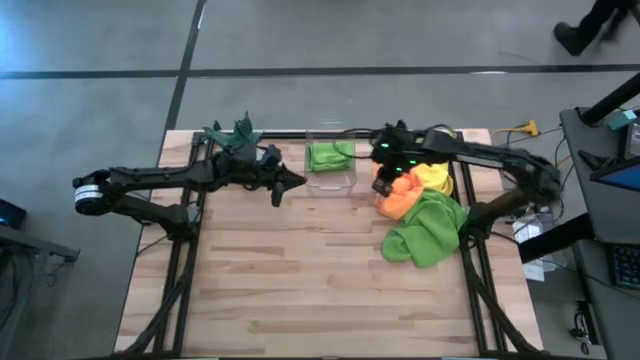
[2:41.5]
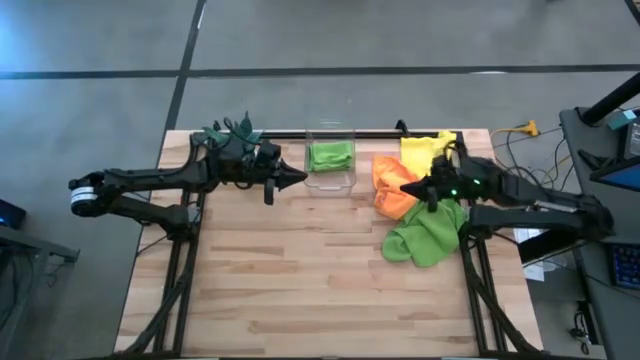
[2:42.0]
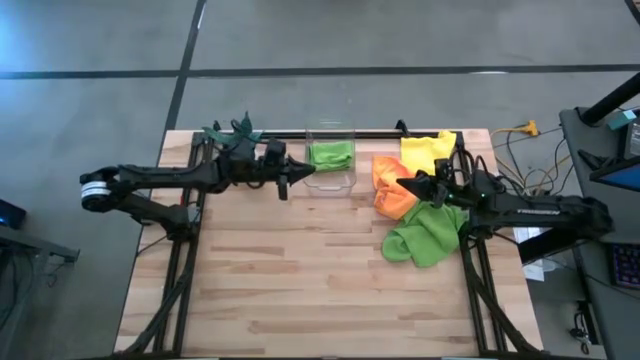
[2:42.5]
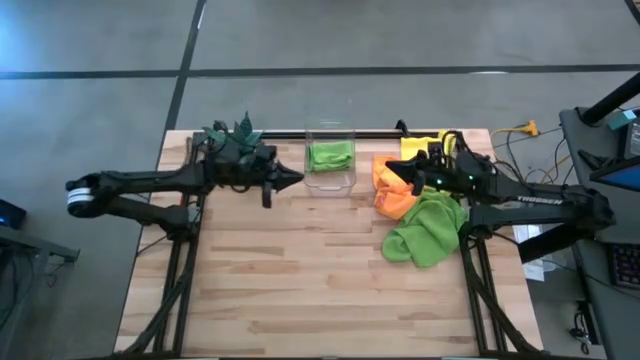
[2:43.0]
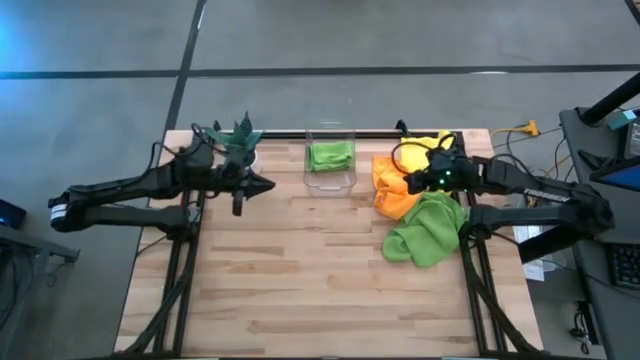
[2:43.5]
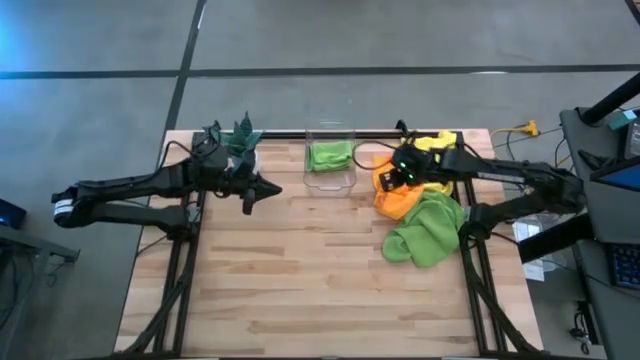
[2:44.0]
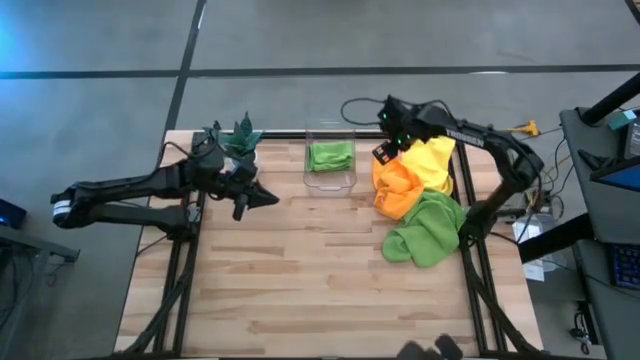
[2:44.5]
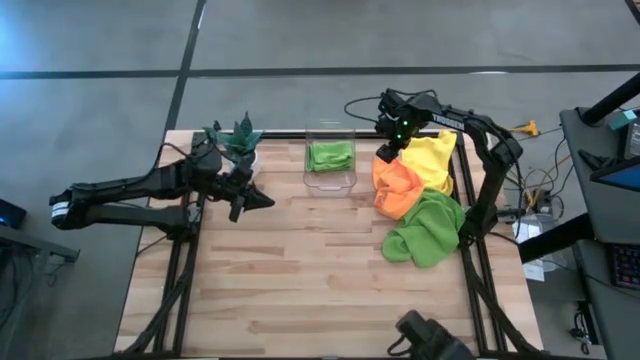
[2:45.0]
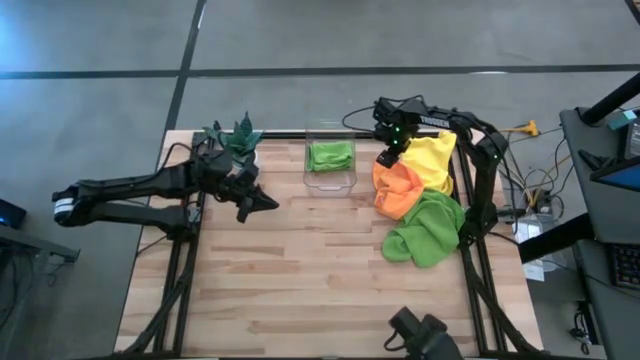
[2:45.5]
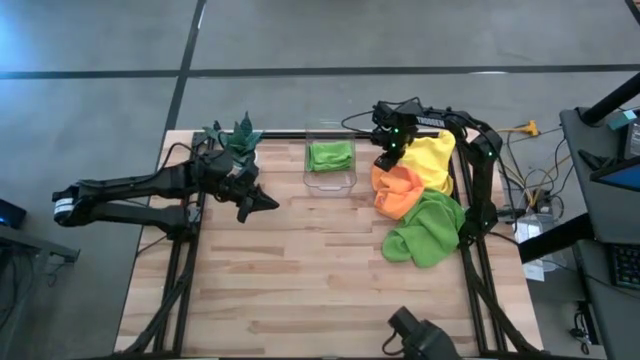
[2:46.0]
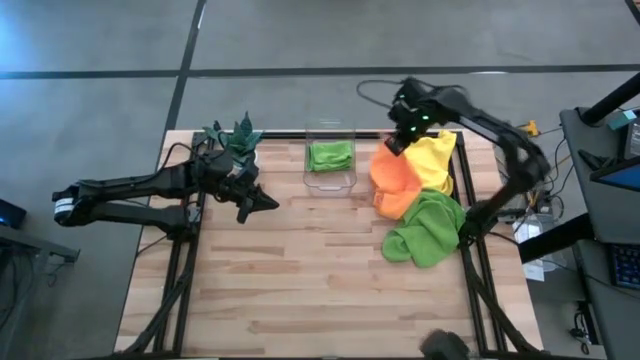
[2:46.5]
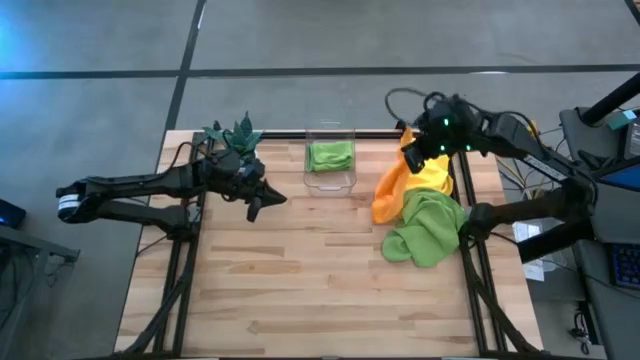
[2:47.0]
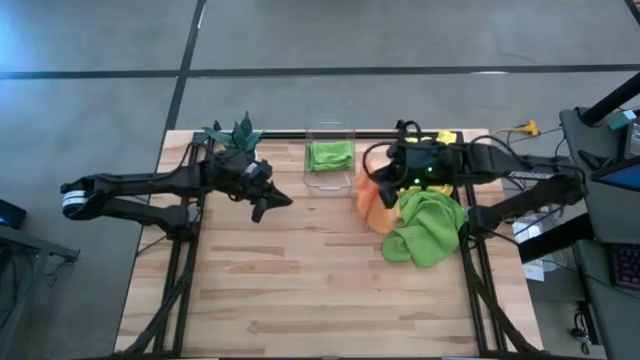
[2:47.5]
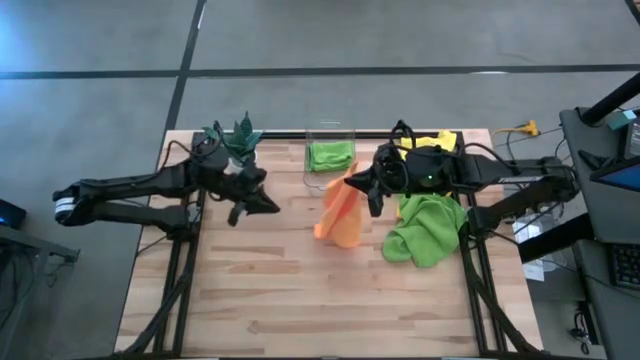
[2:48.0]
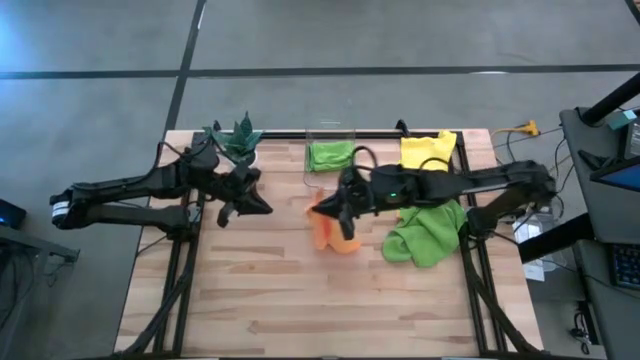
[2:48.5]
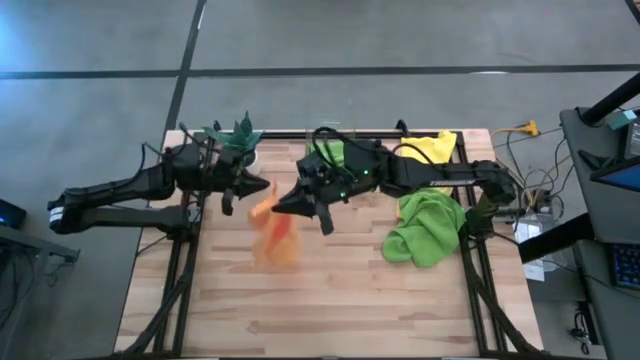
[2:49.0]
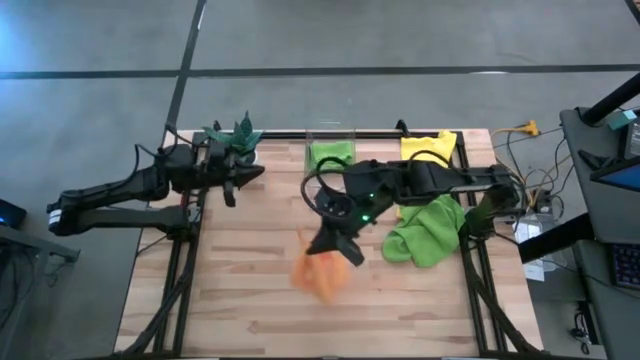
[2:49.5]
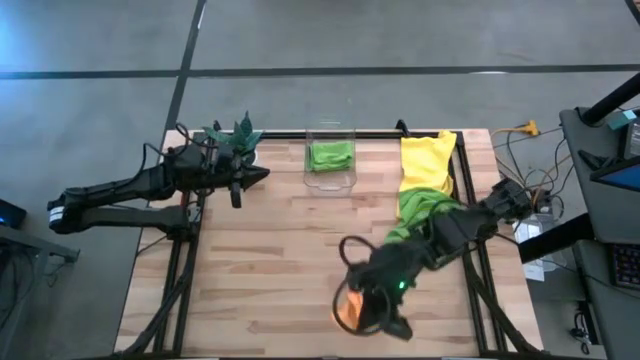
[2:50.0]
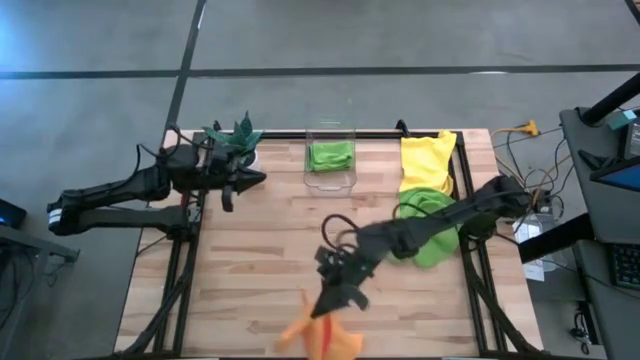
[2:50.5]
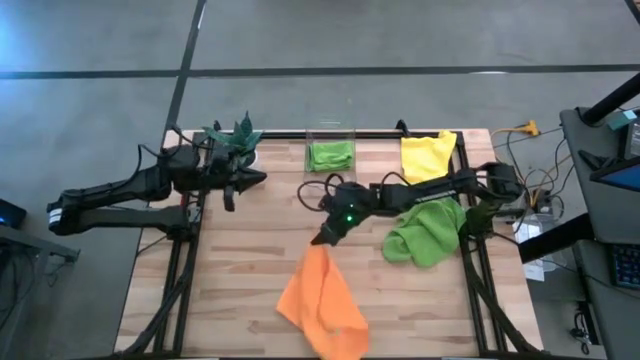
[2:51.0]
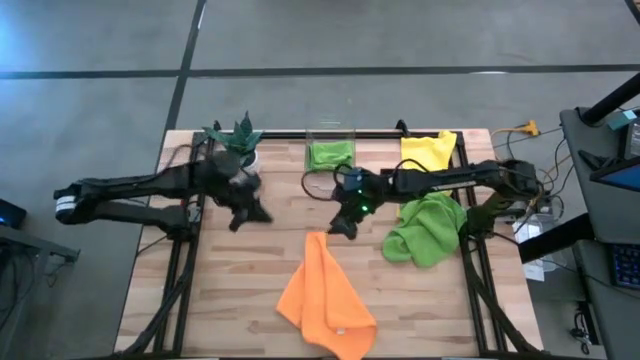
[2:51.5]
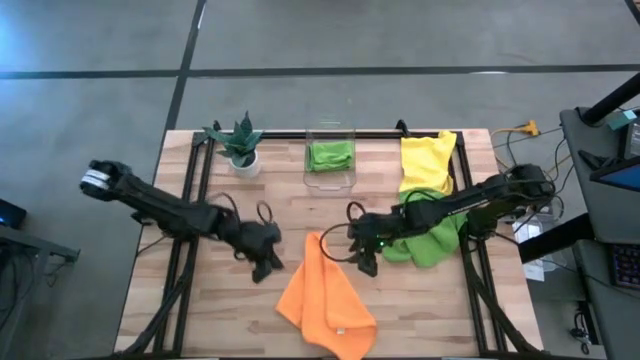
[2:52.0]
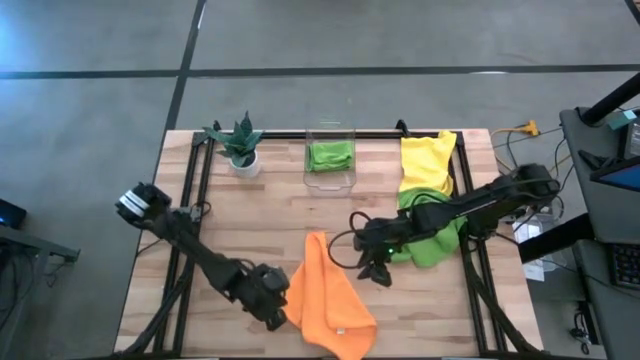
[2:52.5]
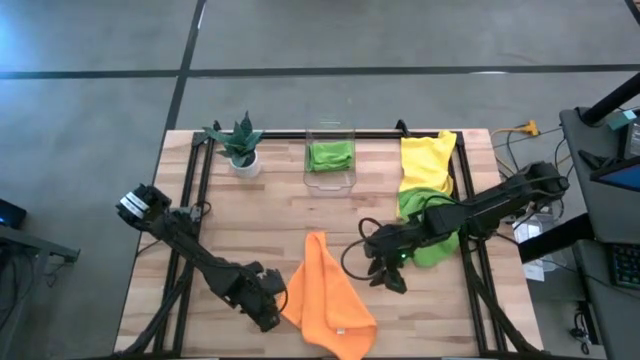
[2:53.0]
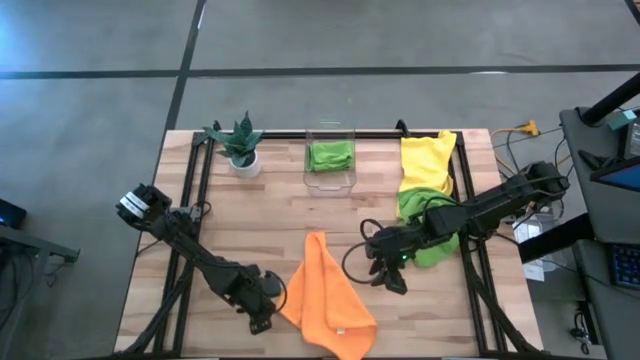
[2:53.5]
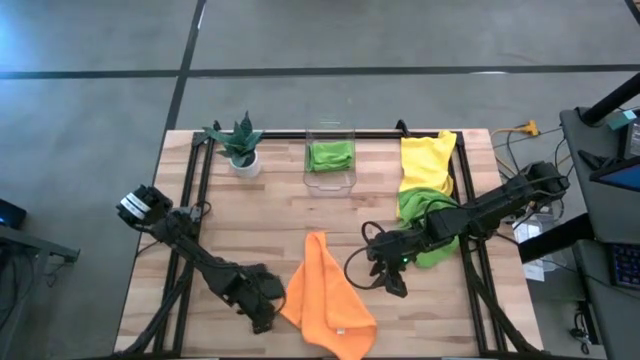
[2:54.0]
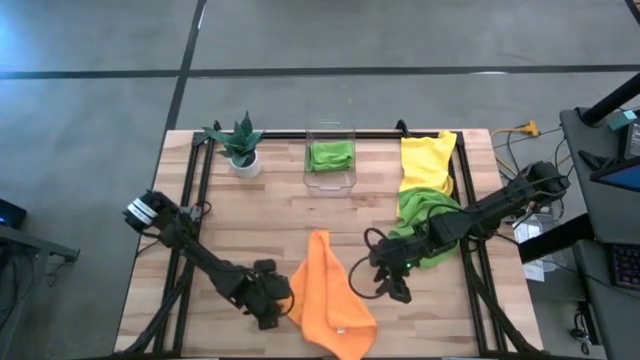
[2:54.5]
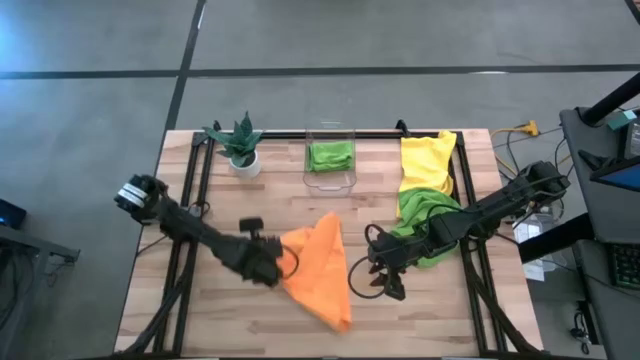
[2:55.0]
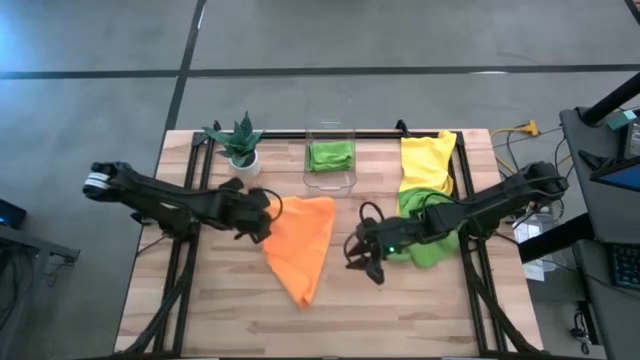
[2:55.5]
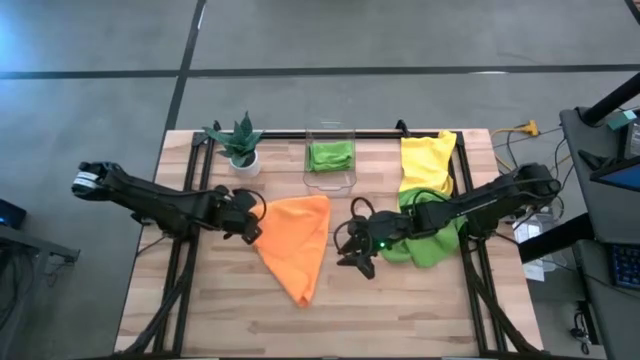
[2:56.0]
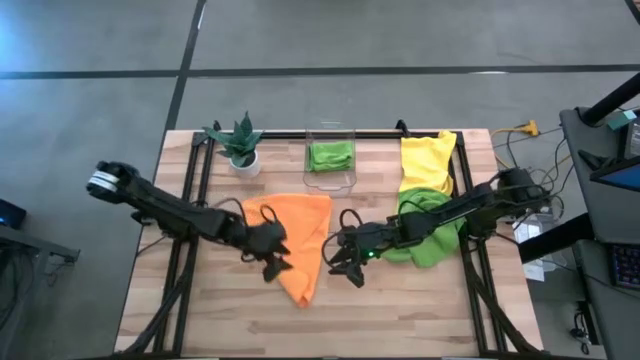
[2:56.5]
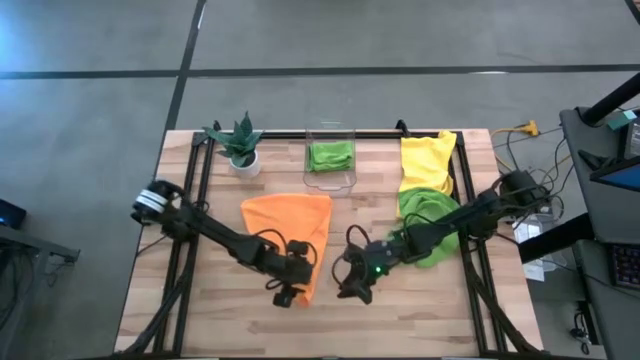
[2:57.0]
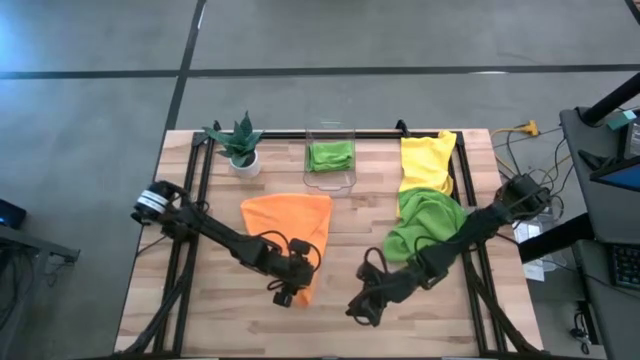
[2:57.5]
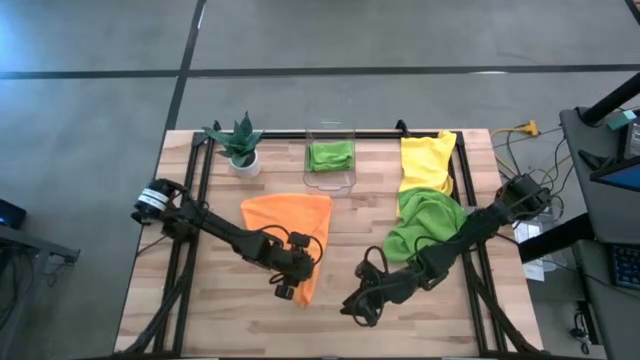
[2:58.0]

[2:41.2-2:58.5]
Task: Fold microfiber towels
Fold the orange towel

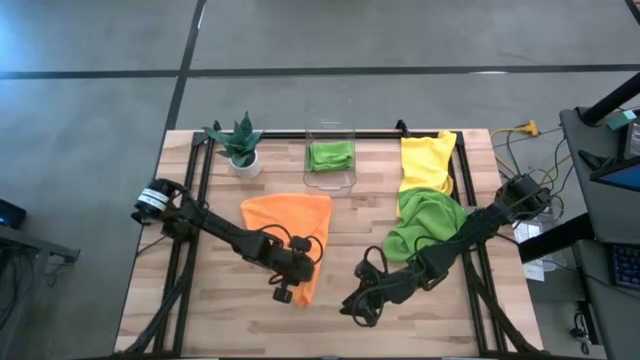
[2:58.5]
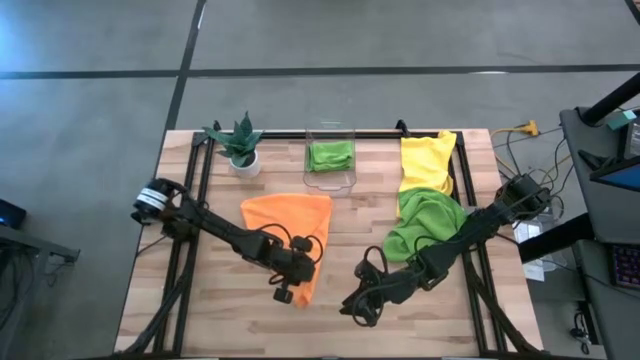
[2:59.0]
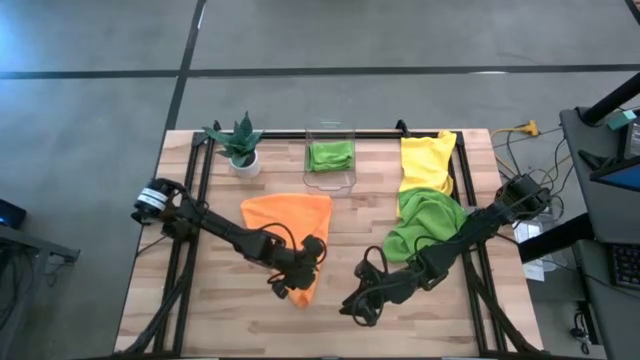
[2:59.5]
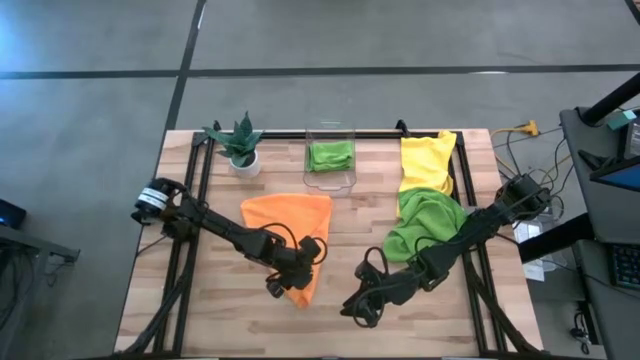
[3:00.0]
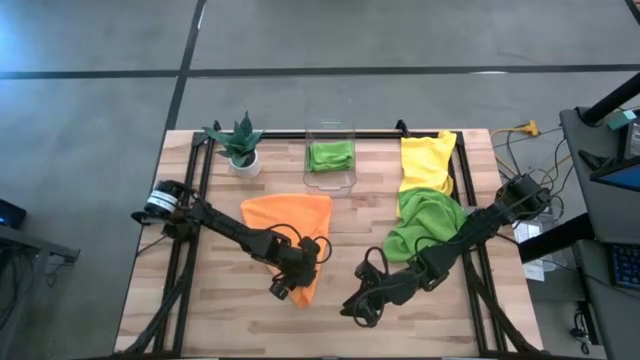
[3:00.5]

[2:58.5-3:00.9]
Fold the orange towel

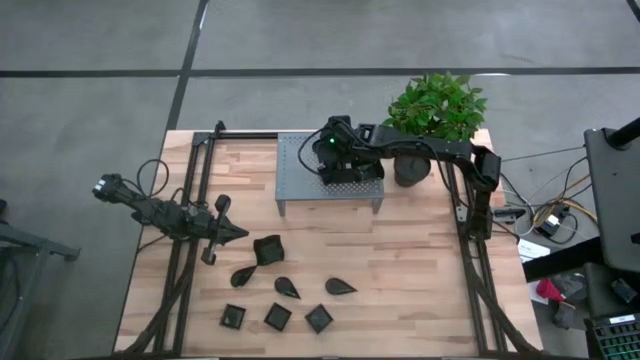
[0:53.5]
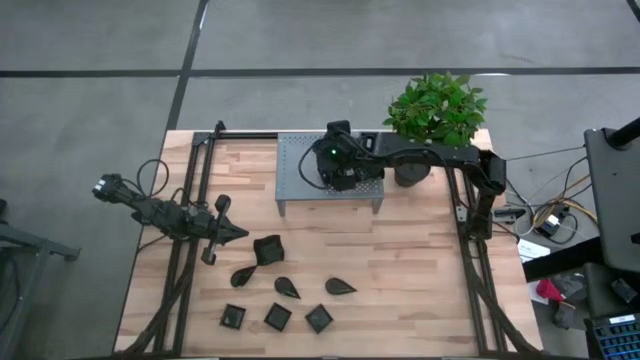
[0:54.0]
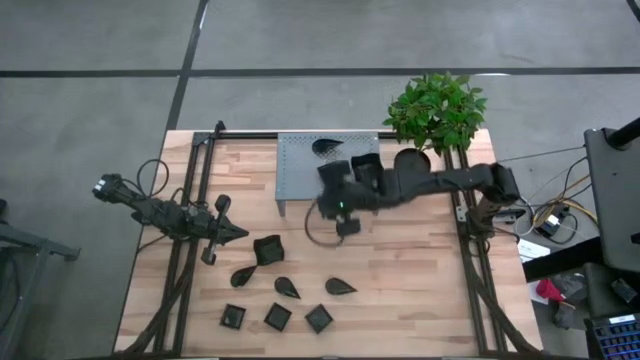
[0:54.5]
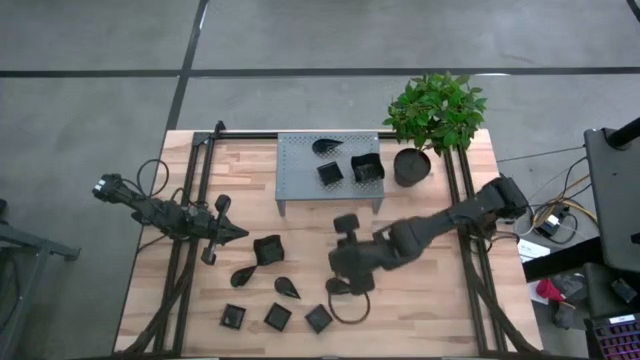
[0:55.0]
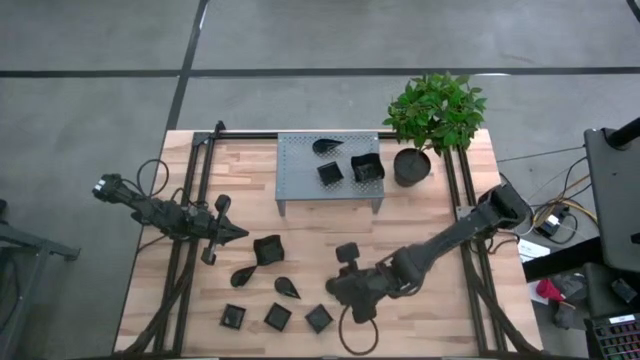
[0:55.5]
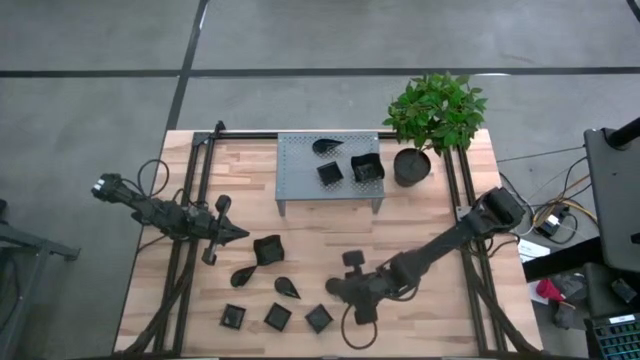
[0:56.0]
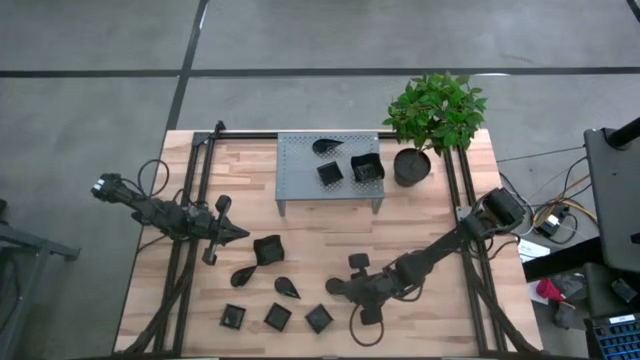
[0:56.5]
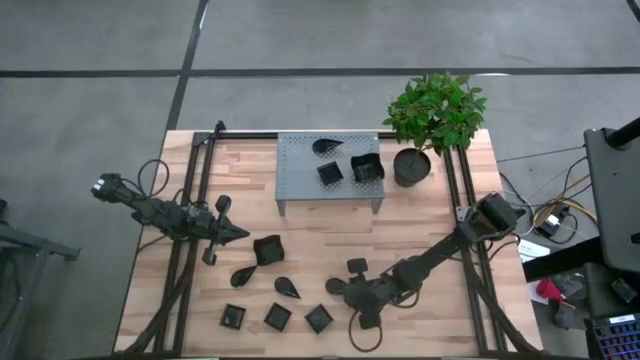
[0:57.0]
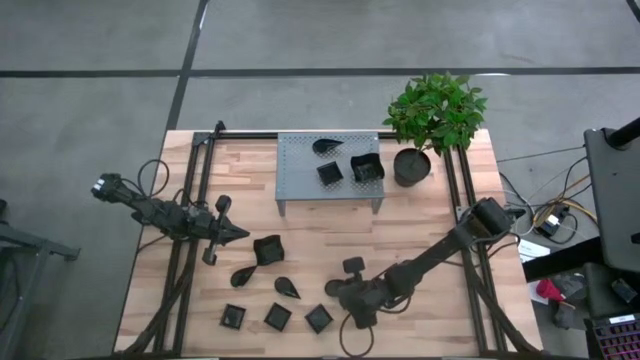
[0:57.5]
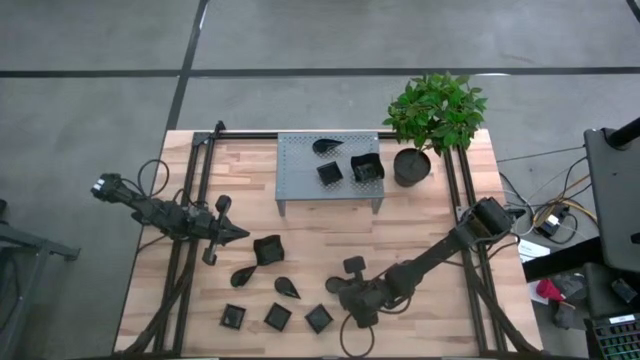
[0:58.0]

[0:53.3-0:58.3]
Task: Pick & Place Mini shaped plates
Stack the black drop-shaped plate on top of the black drop-shaped plate on the shelf
